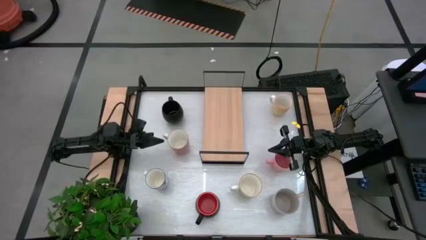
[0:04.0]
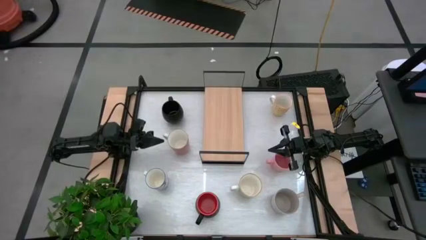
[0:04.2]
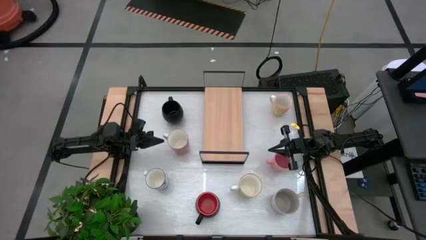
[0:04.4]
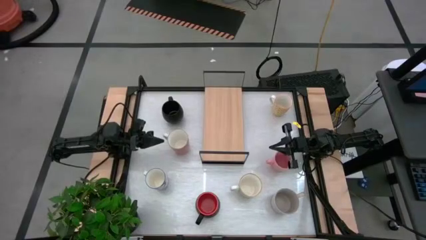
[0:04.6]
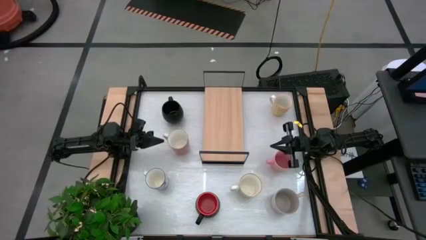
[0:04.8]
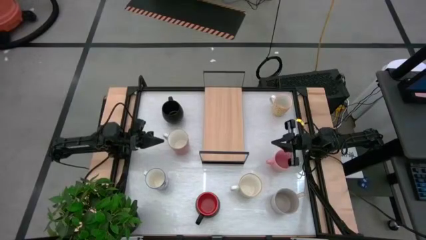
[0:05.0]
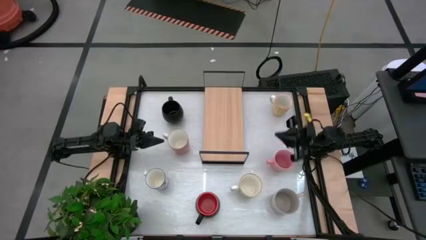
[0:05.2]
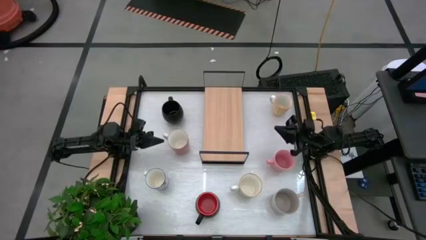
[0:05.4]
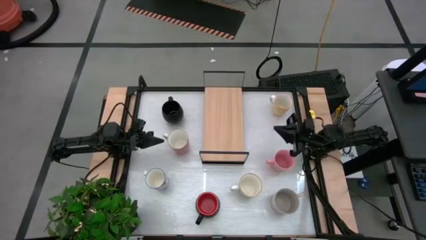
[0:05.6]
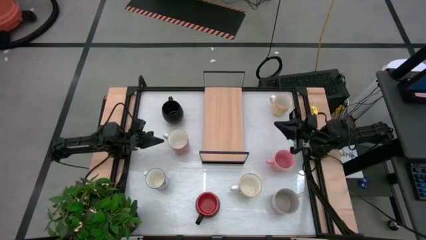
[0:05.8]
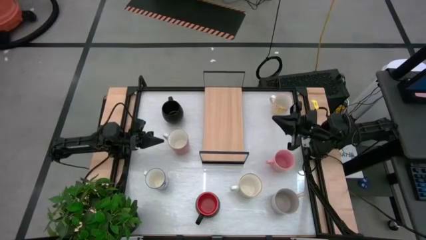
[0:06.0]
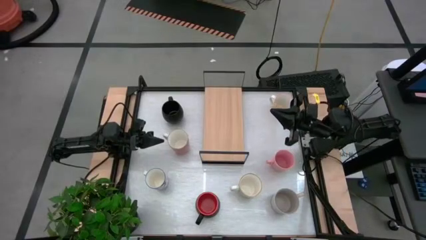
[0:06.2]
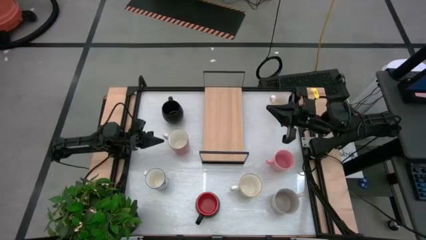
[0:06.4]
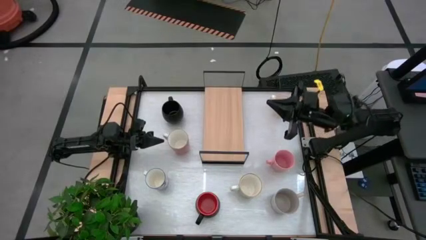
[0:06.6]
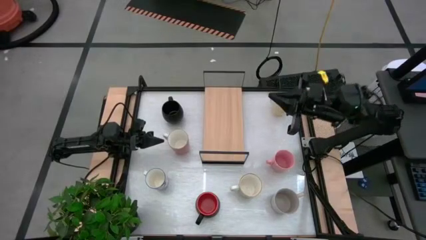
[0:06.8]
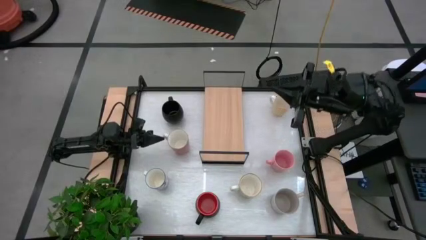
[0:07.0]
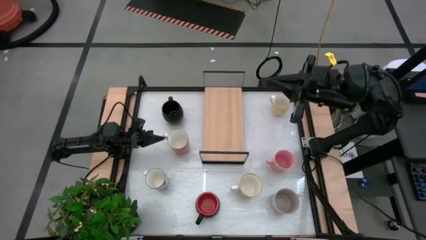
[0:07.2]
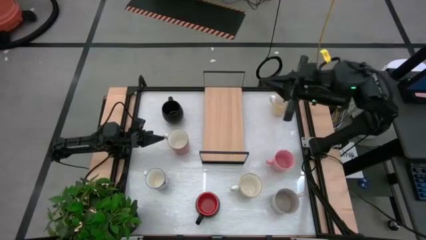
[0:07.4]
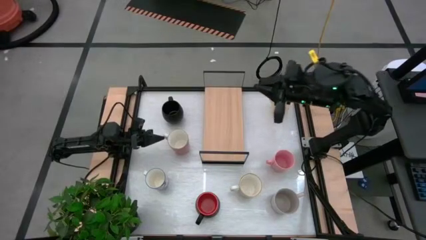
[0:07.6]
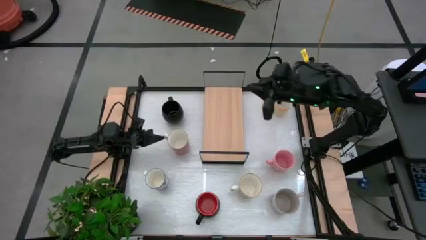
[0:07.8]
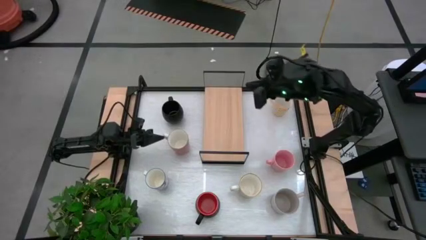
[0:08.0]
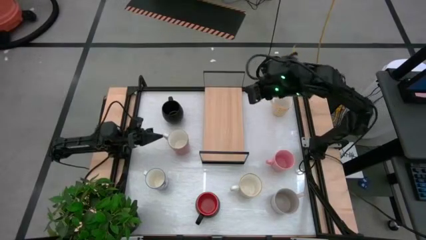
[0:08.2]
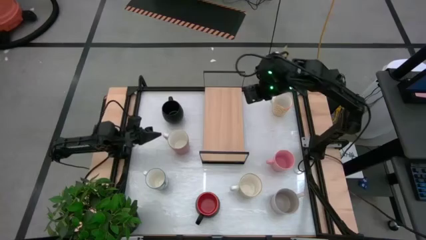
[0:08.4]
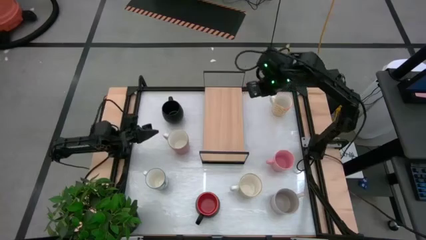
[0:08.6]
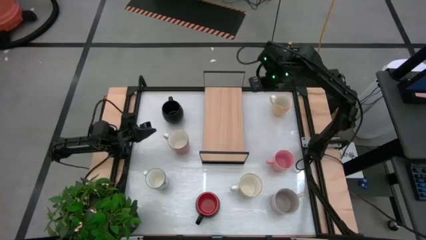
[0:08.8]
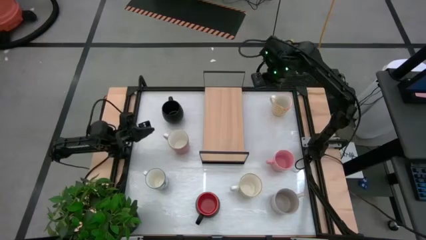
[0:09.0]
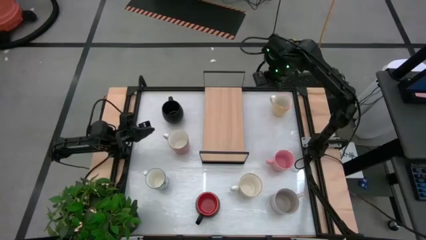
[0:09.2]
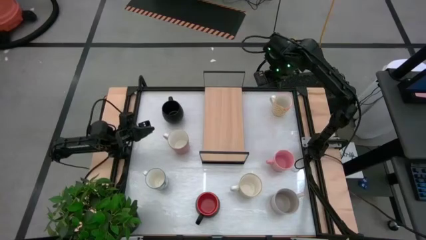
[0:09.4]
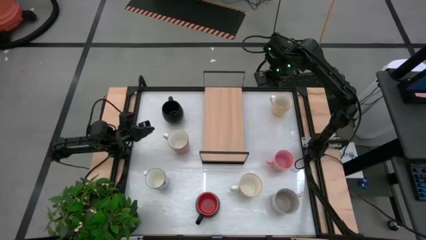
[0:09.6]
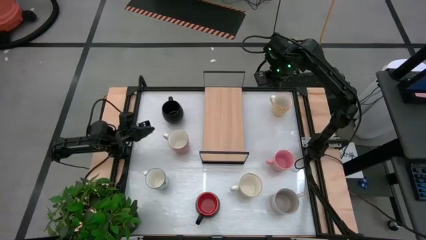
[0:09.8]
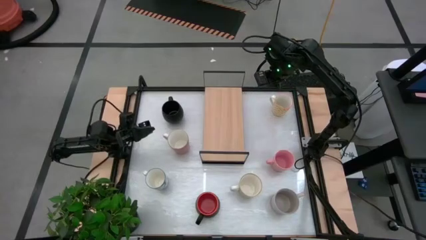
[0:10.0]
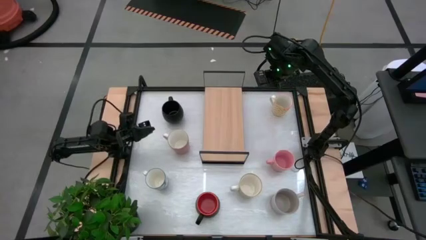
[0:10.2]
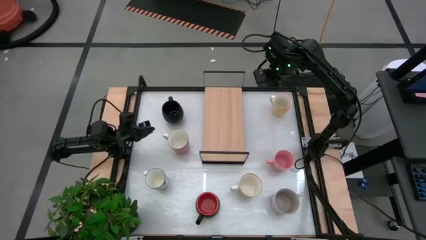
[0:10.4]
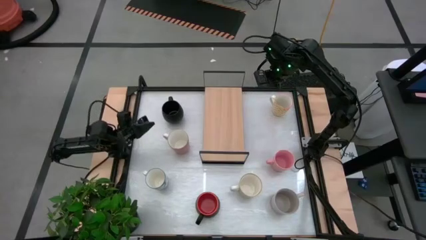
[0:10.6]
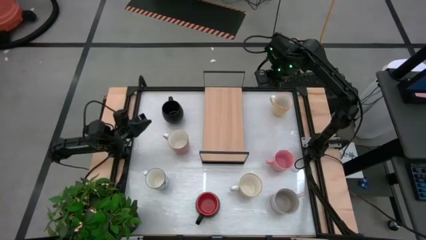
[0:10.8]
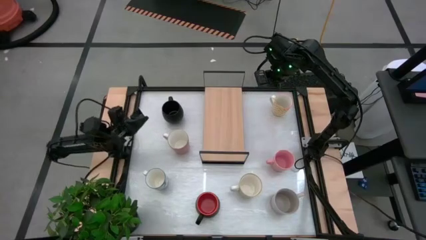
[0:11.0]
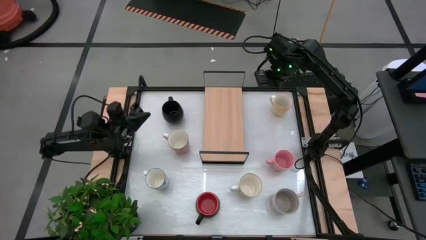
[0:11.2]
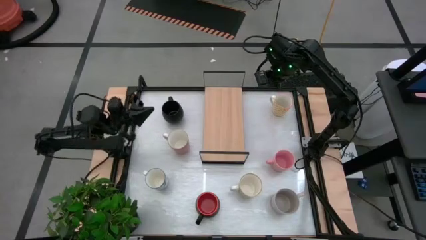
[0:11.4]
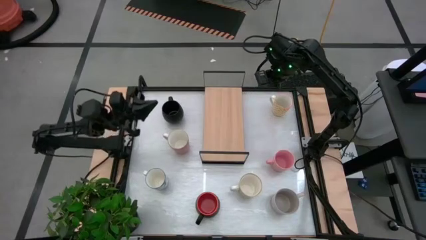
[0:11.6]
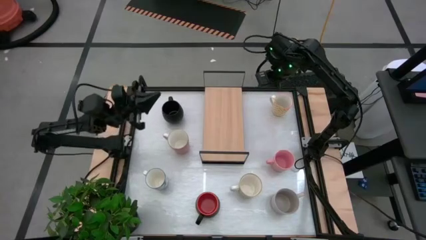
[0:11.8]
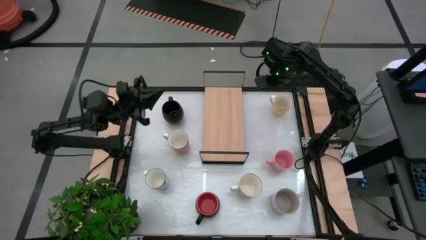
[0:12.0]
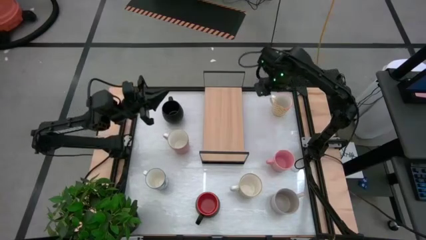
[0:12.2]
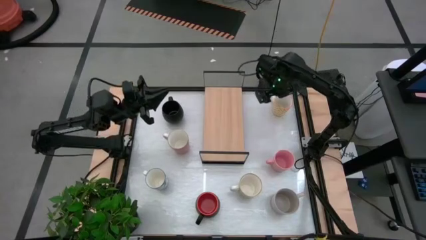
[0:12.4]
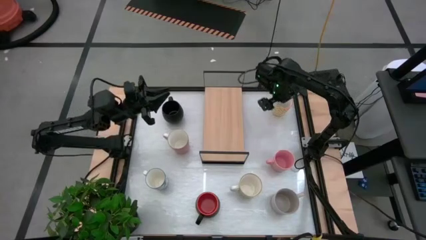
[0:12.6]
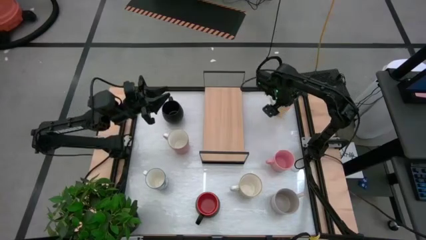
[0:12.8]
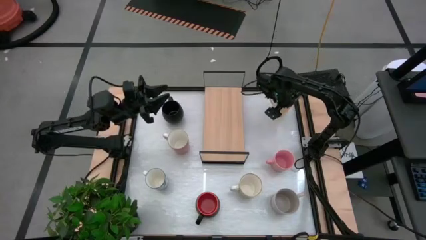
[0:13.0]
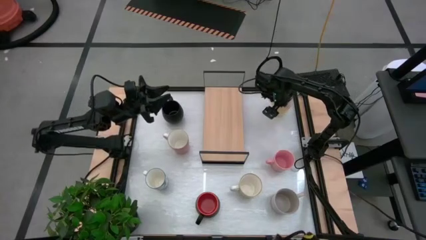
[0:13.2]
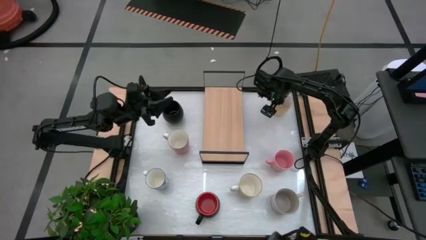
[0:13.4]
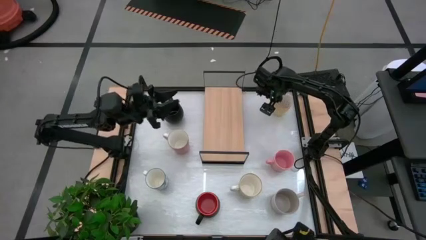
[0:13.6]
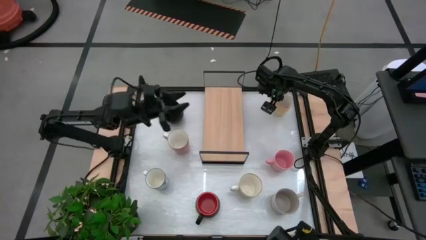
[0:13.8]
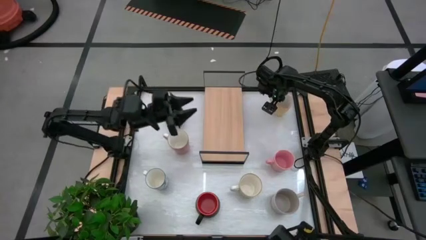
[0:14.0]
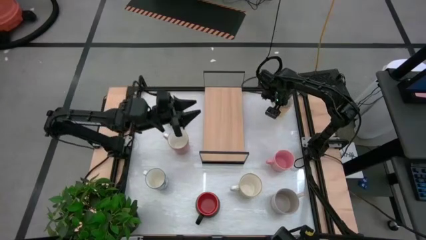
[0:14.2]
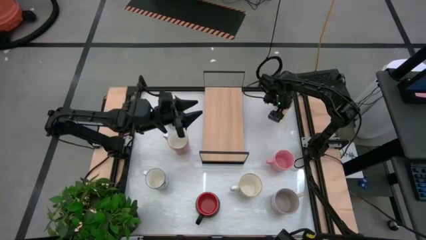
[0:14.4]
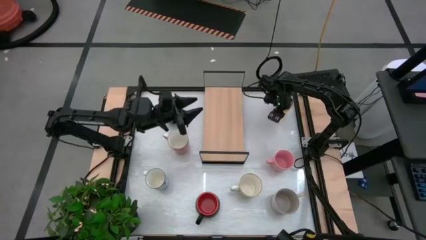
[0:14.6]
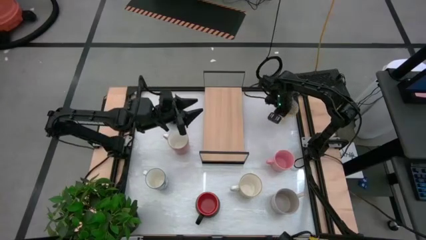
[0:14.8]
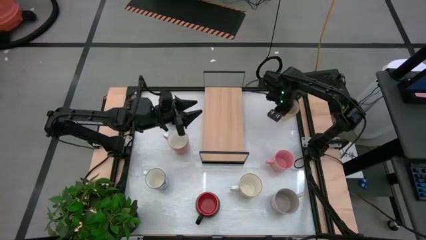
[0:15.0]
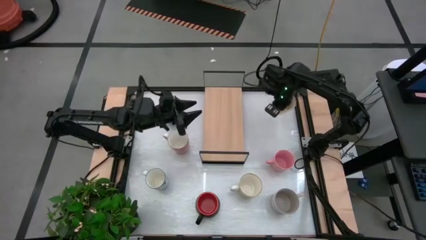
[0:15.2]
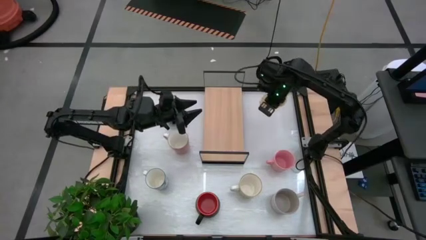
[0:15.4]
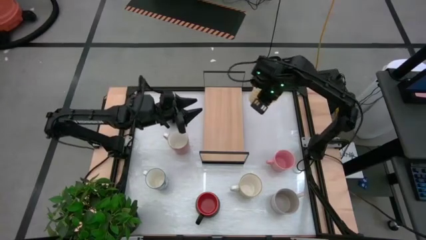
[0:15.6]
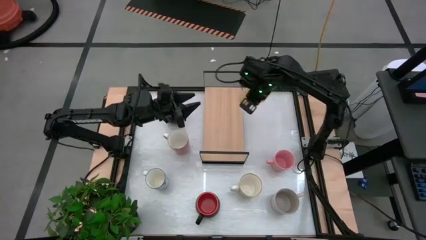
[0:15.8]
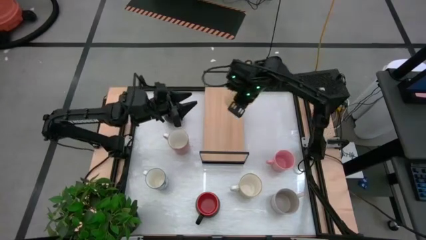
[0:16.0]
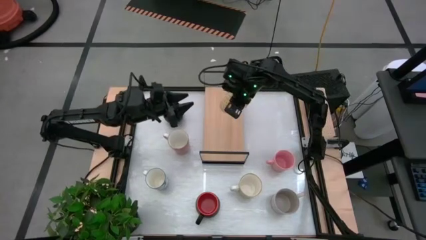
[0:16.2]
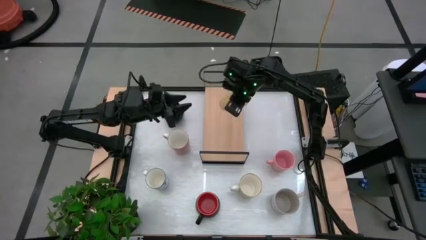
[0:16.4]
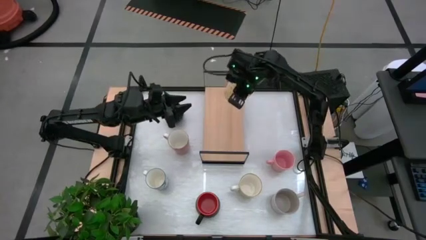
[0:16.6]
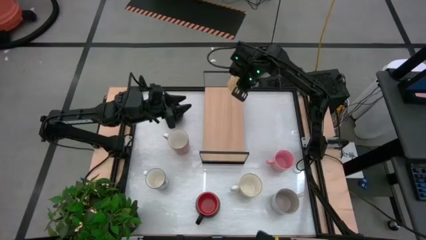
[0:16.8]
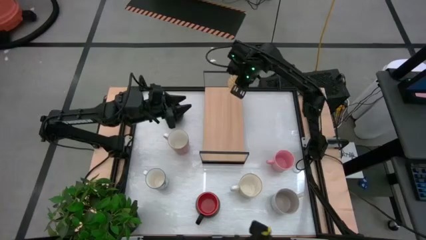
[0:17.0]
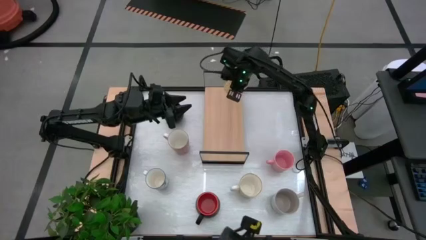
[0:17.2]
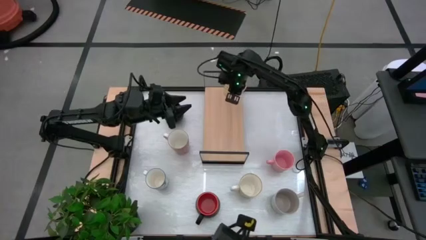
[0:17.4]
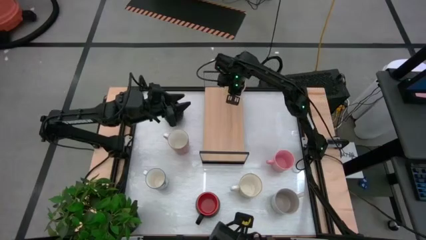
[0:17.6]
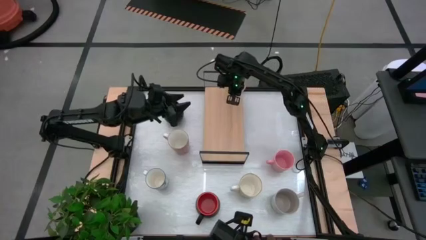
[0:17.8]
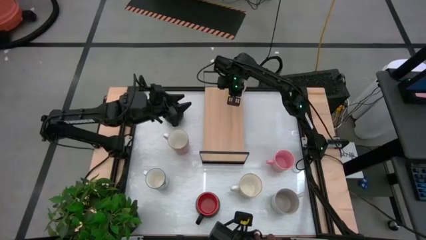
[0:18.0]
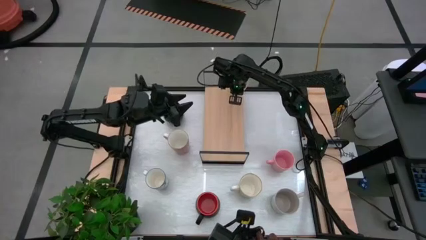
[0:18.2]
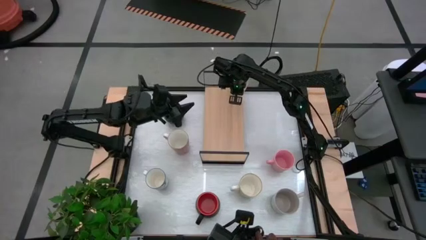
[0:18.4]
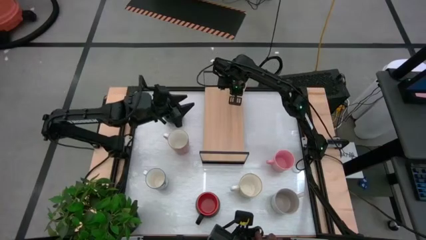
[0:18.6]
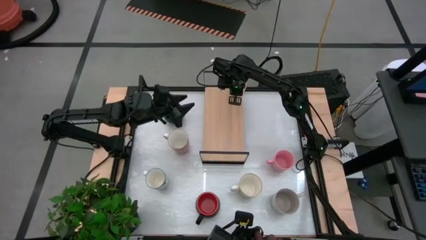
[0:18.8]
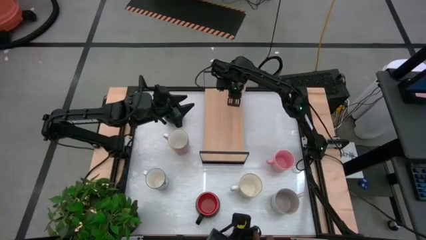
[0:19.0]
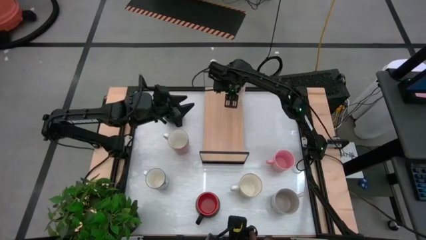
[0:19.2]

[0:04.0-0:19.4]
Task: Place coffee mugs
Put the yellow pattern mug on the shelf
